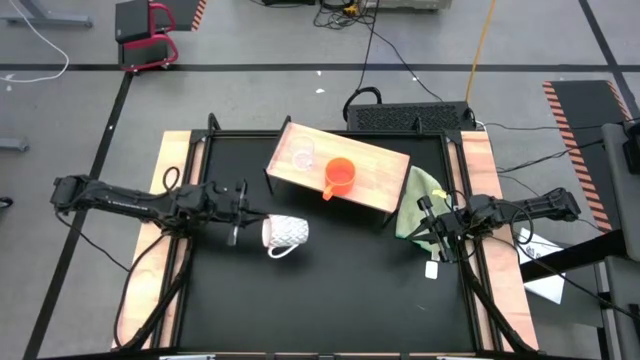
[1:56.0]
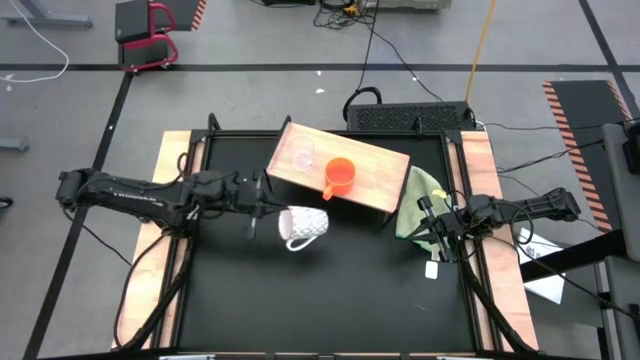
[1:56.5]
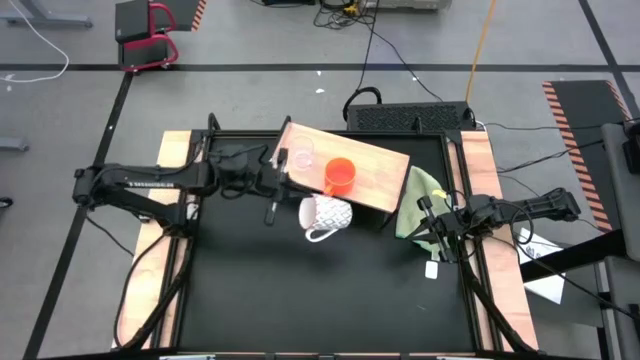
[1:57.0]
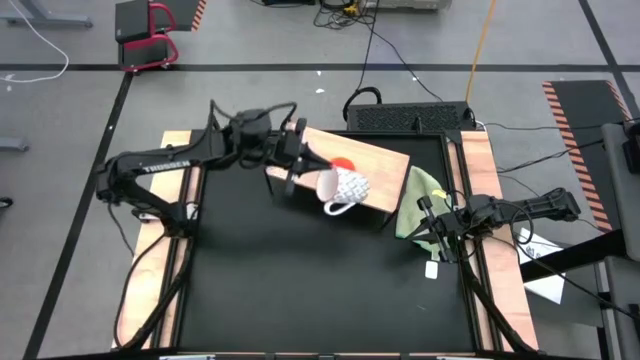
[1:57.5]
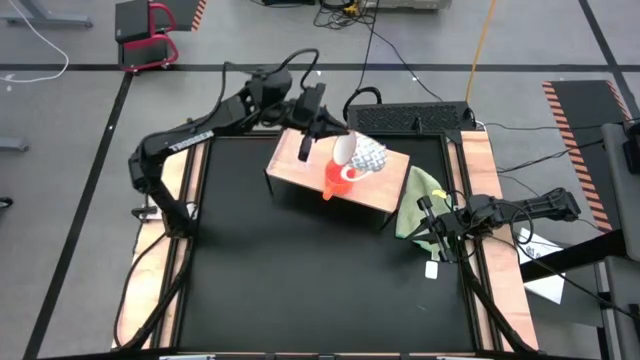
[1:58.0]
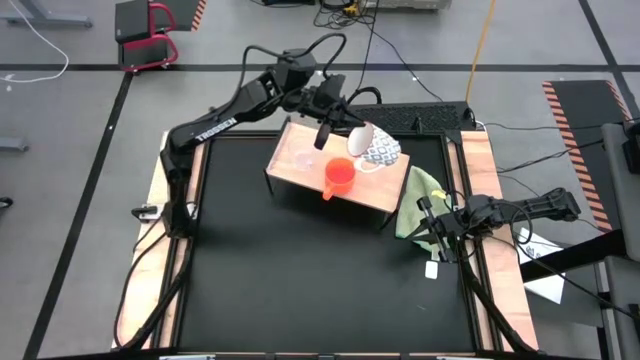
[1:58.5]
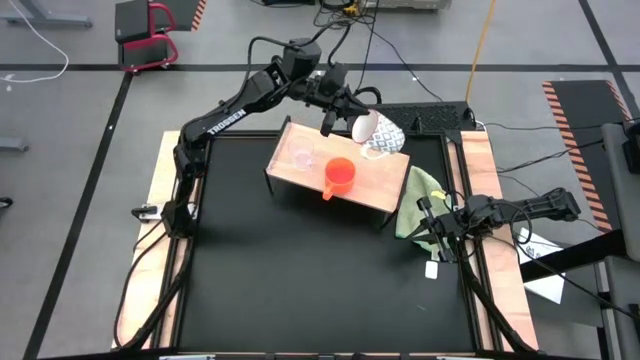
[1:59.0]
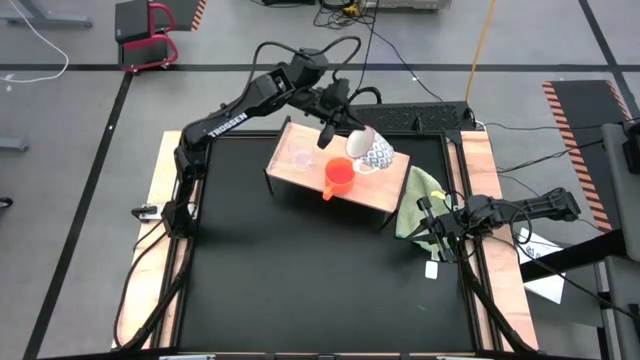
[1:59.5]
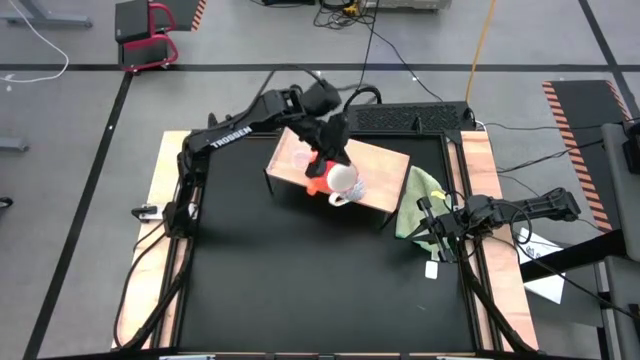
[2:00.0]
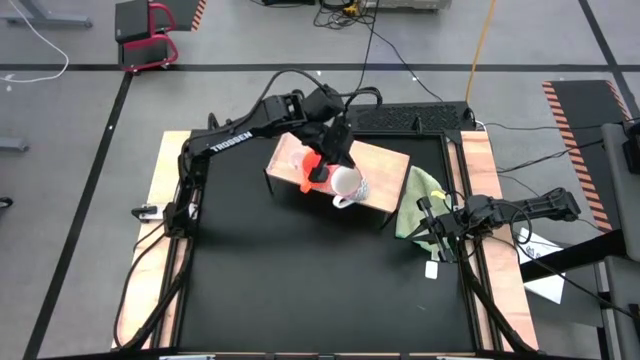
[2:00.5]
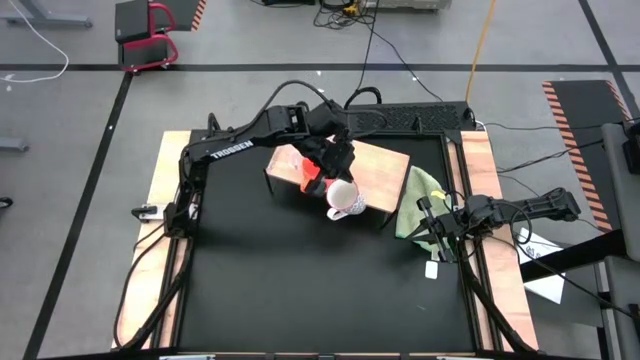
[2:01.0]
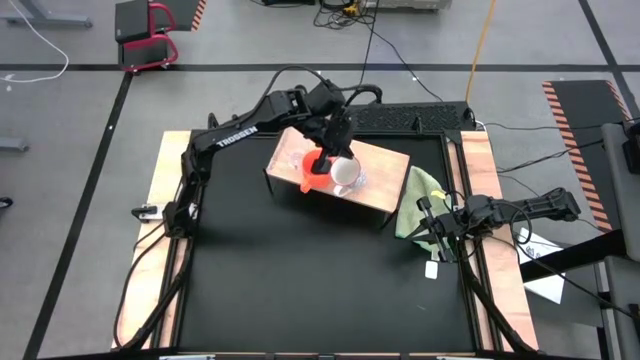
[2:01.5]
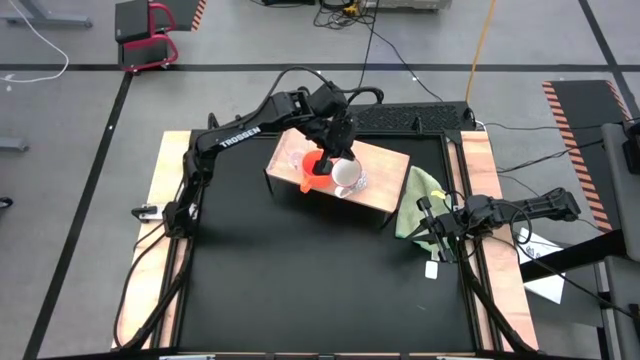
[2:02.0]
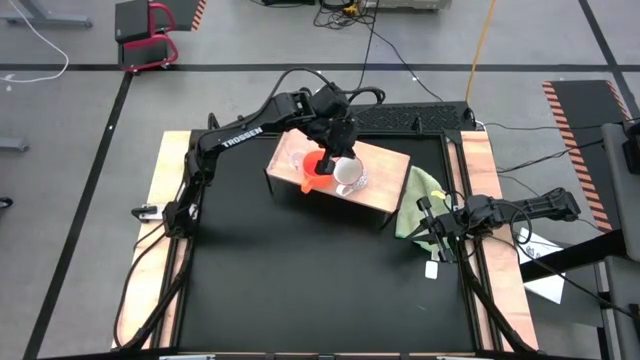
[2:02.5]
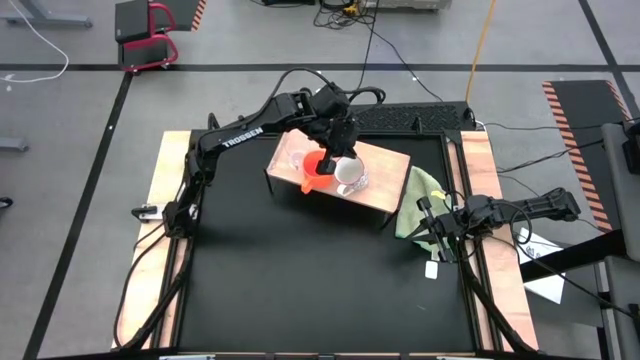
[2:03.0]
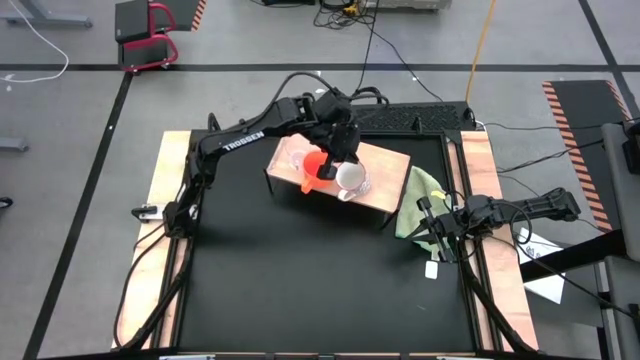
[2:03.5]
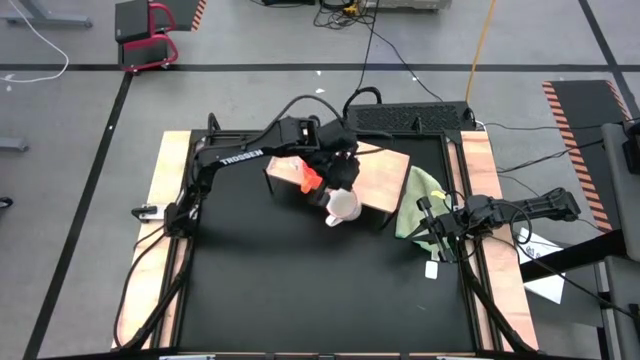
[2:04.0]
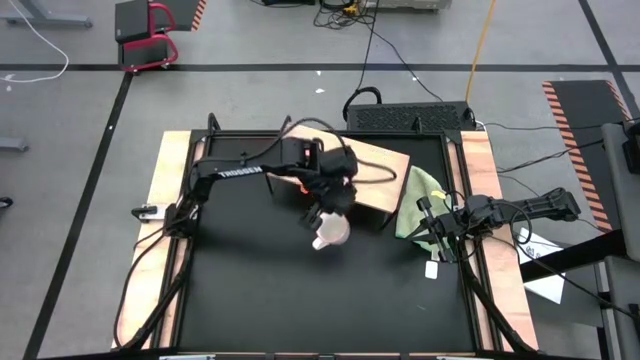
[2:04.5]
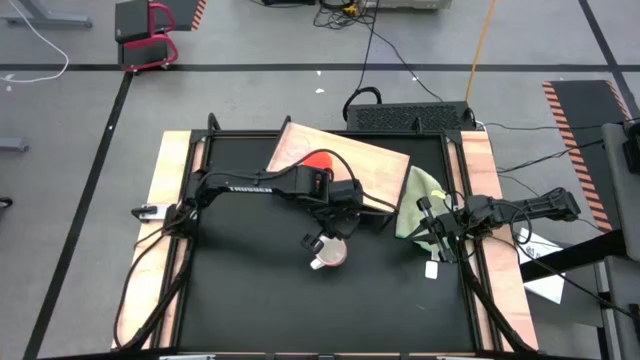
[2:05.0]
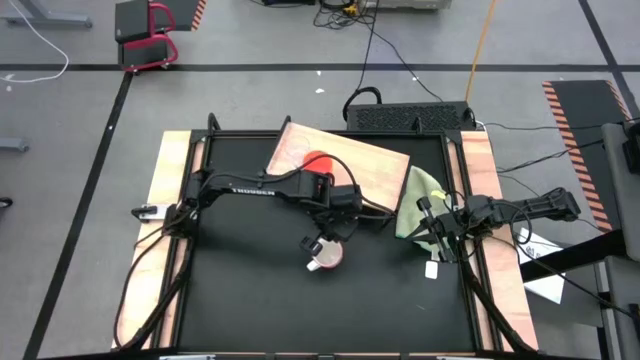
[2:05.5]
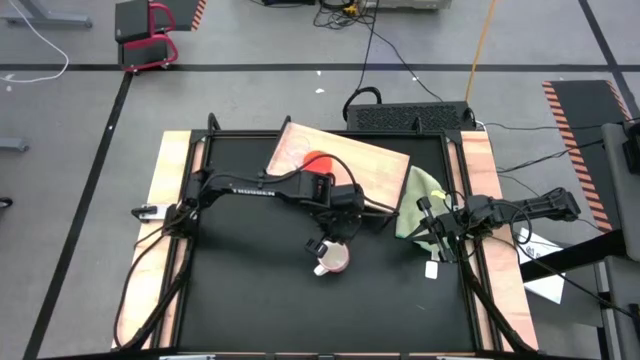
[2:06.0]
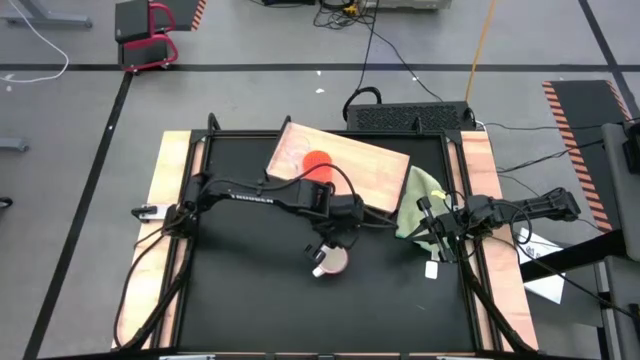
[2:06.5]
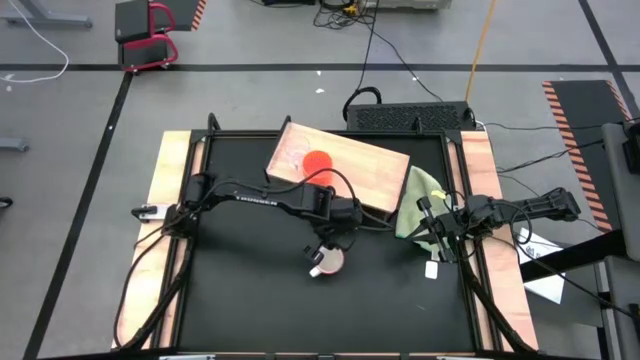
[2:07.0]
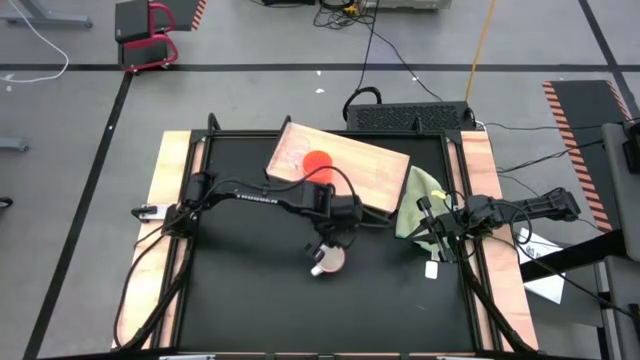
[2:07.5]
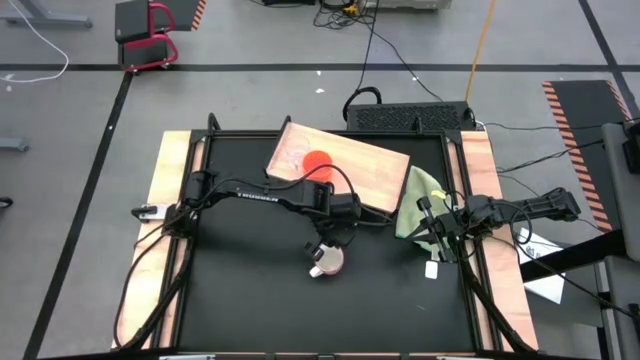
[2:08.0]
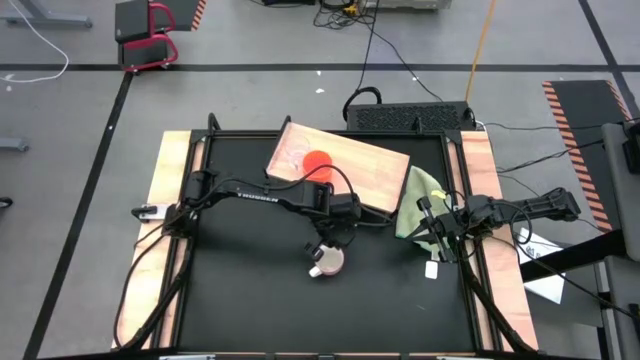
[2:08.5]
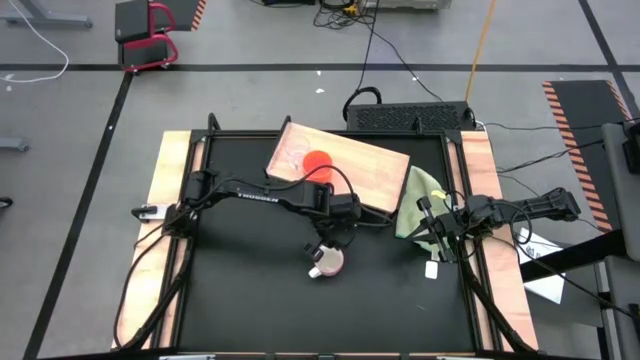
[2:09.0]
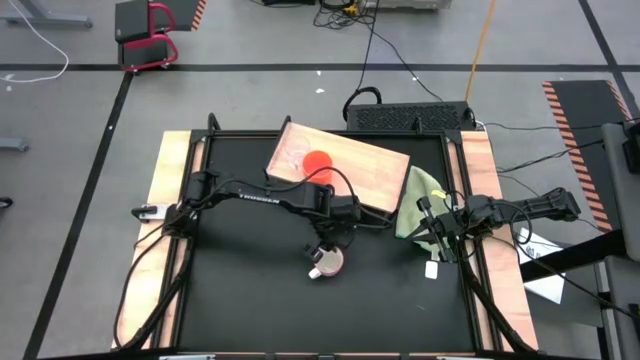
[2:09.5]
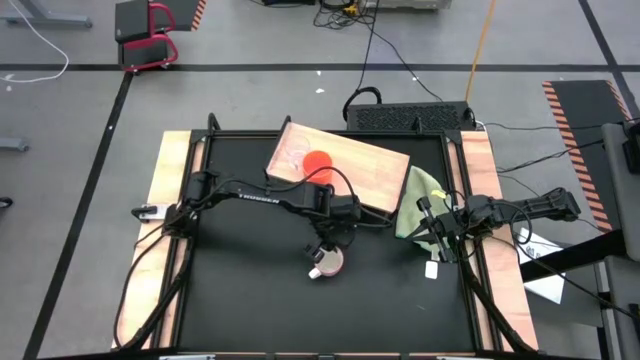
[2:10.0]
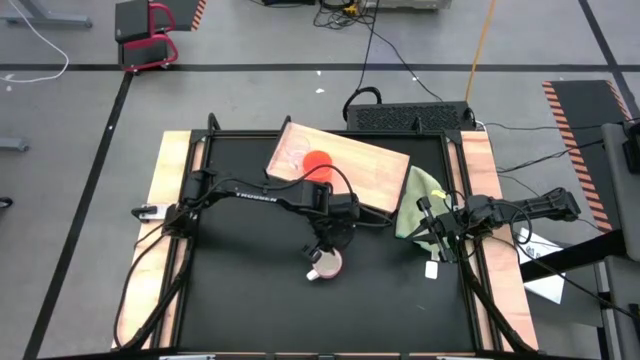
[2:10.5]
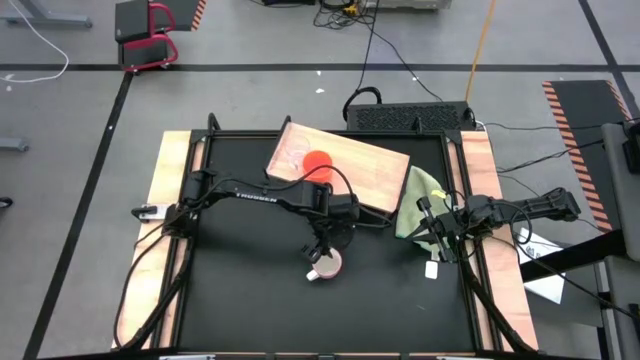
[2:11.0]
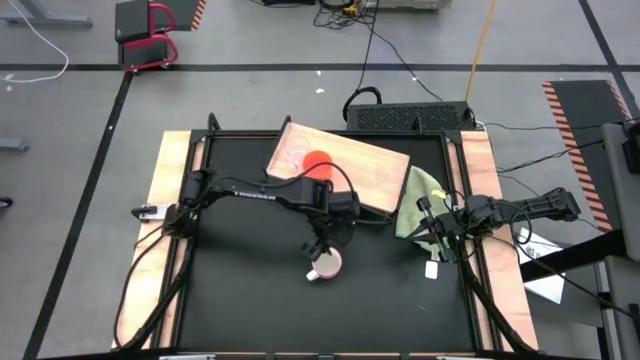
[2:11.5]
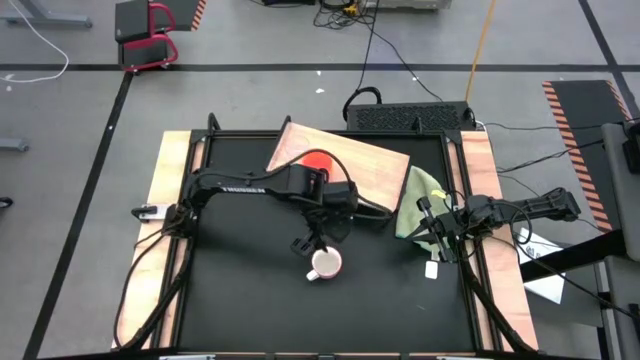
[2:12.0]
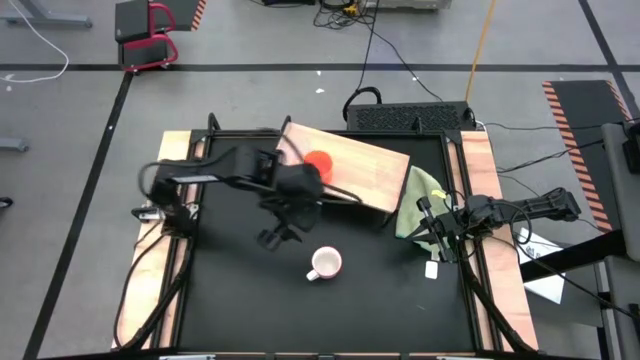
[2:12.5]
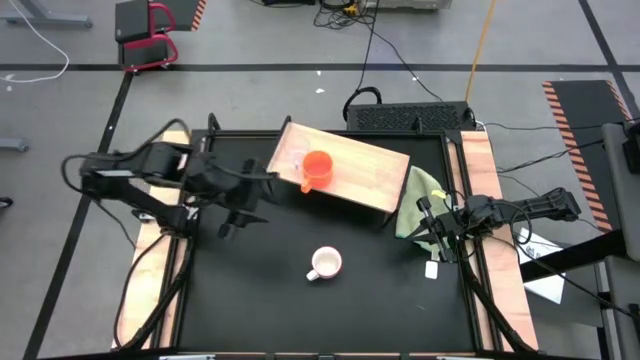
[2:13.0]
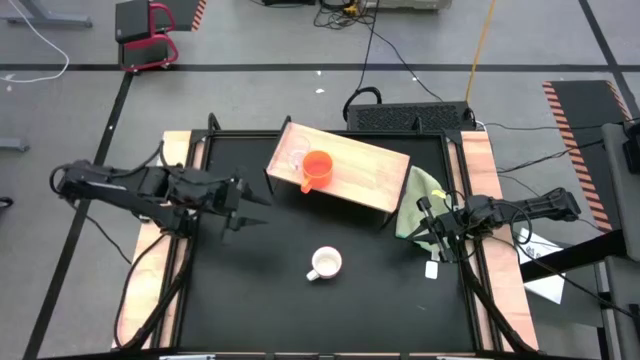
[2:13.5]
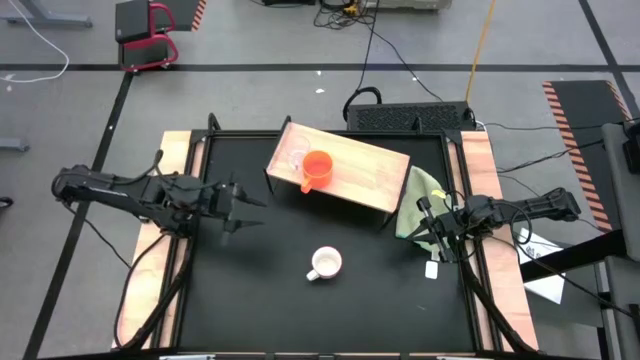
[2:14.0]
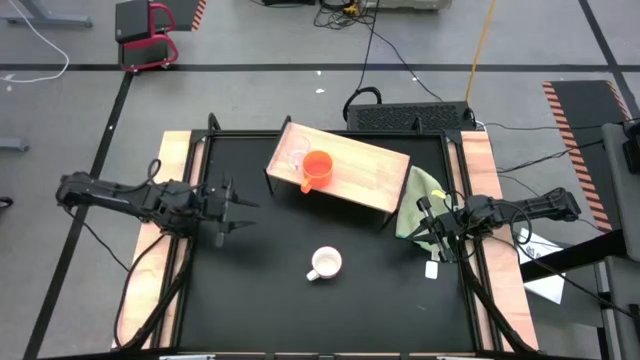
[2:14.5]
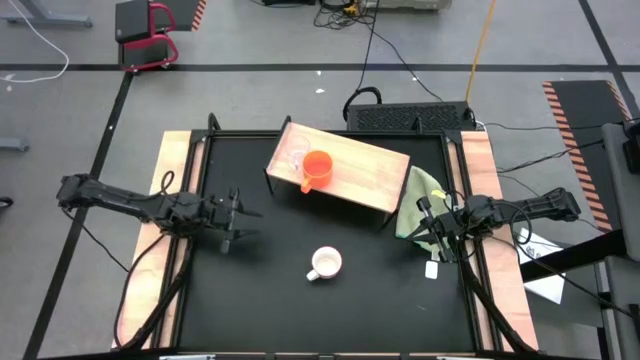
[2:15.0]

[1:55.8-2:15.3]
Task: Stack small to large cups/mugs on shelf
Put the gray patterned mug on the shelf
